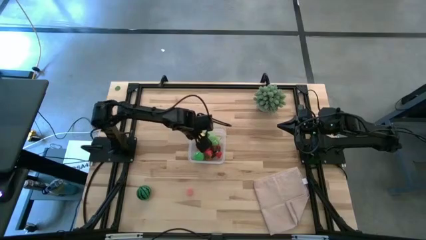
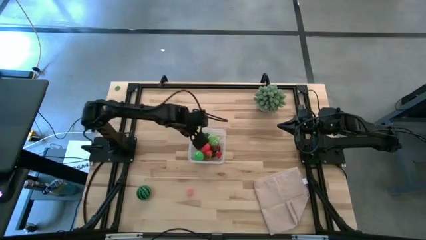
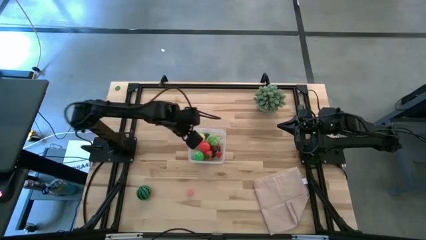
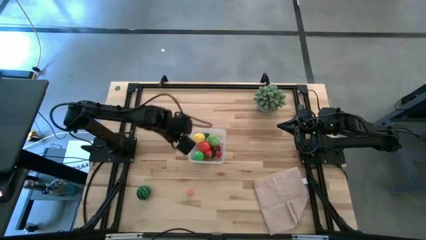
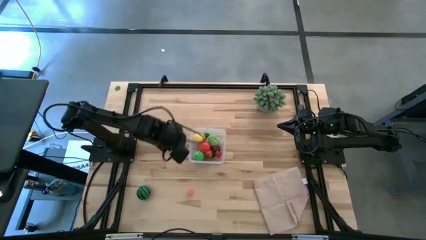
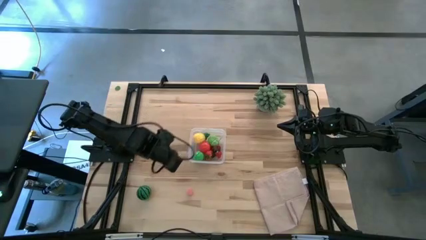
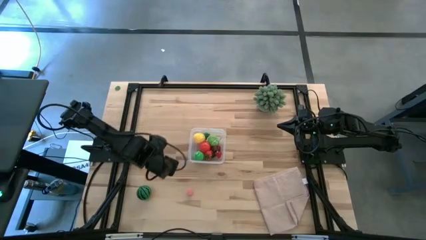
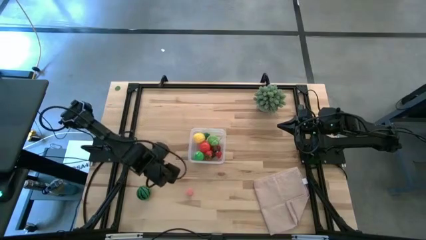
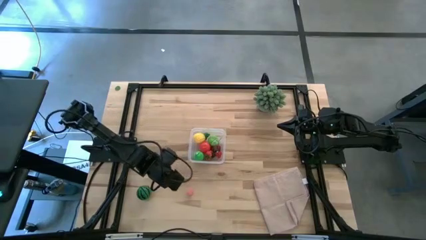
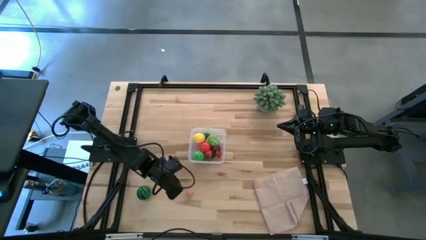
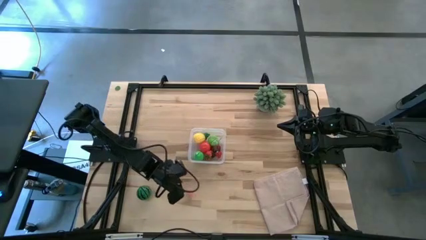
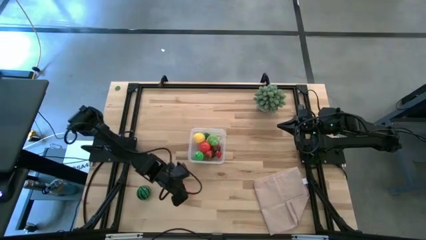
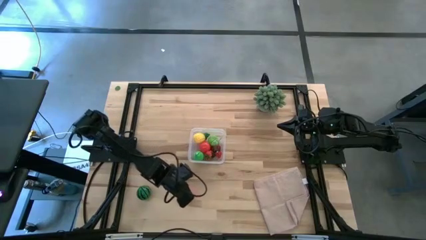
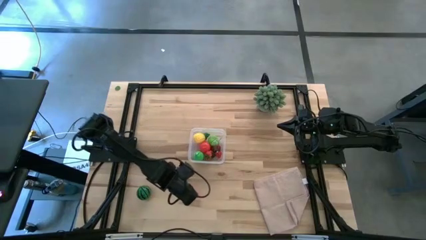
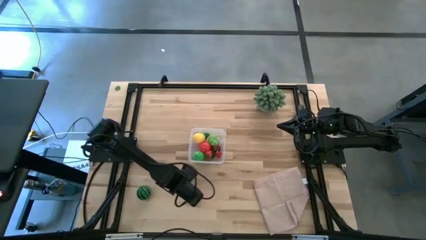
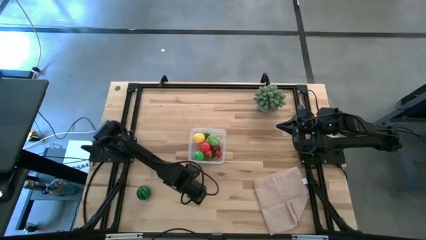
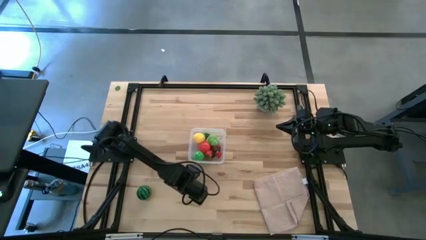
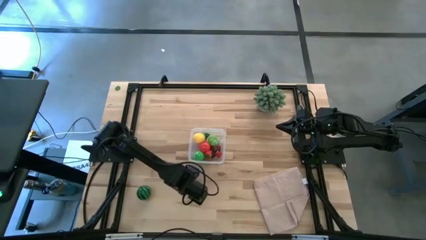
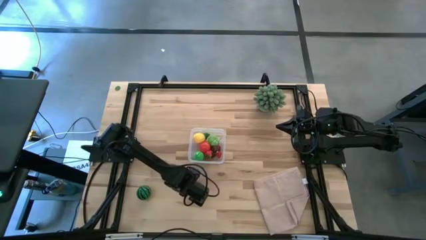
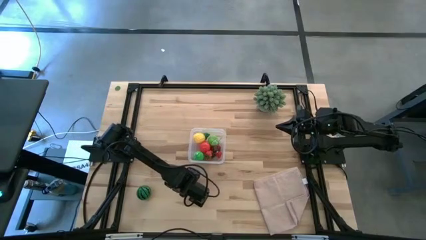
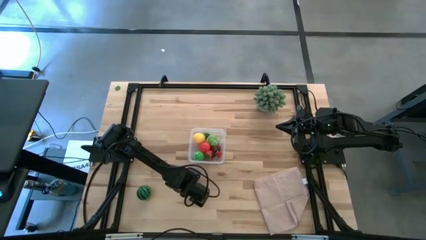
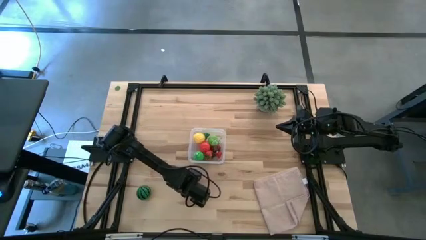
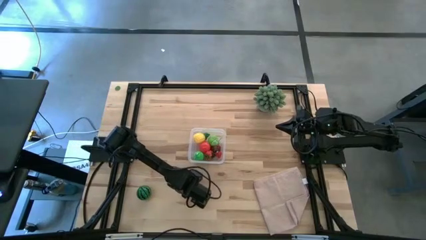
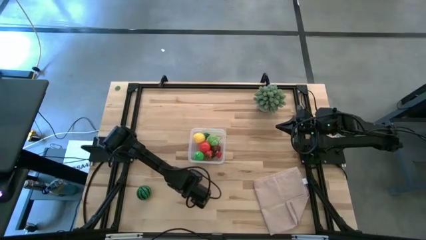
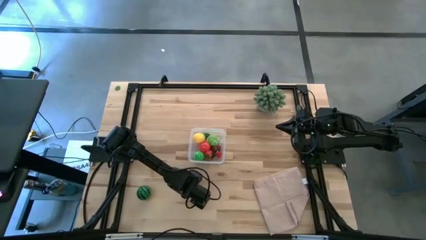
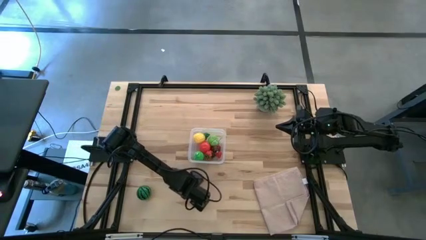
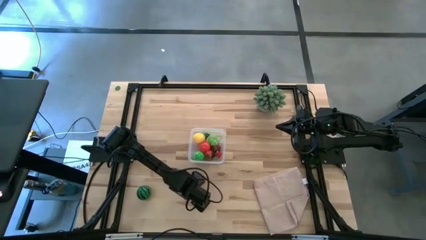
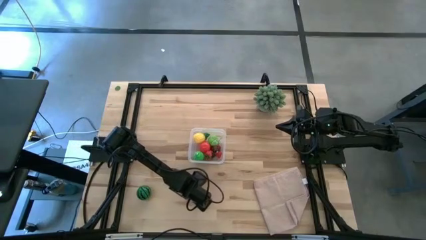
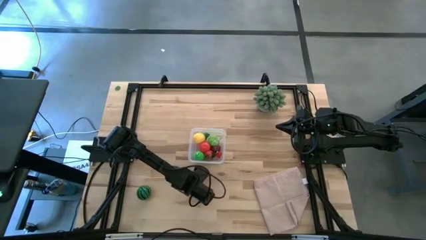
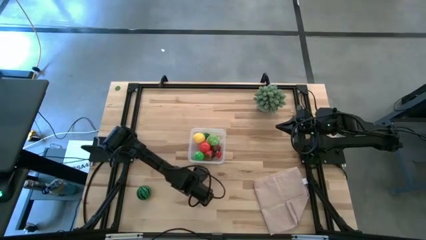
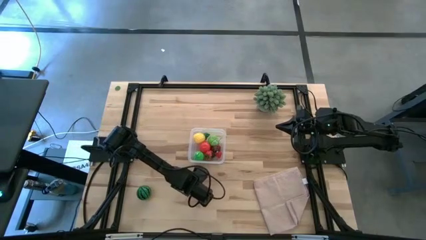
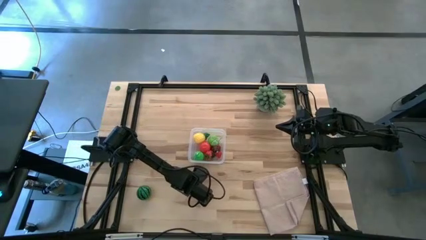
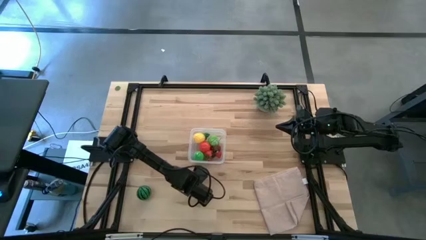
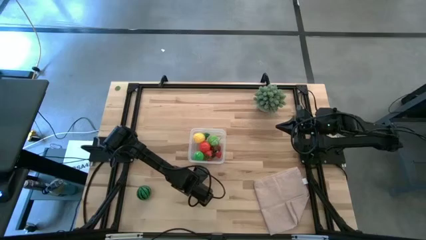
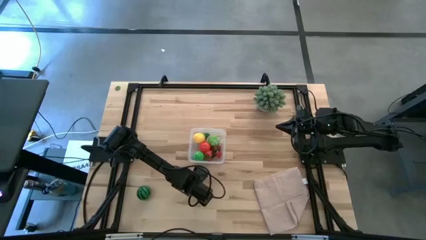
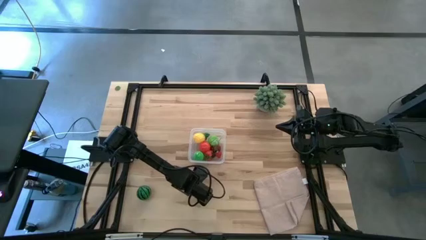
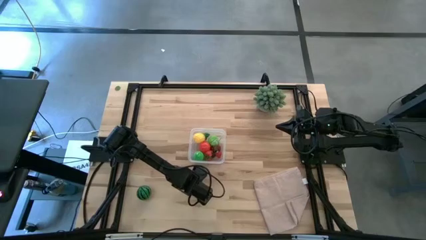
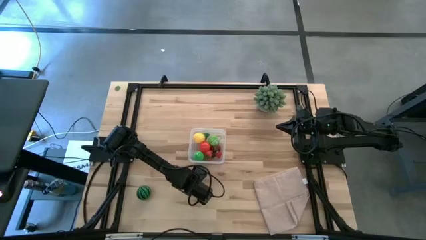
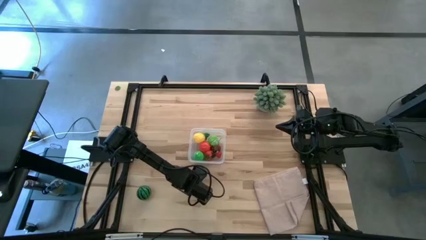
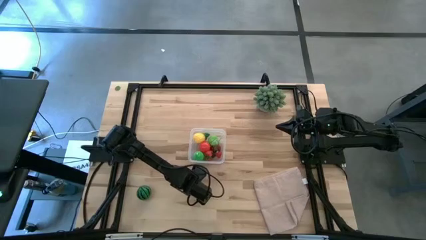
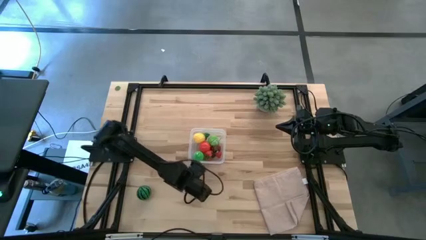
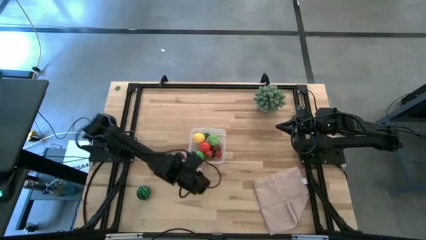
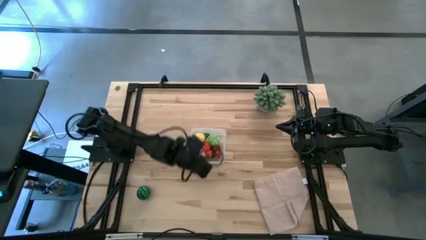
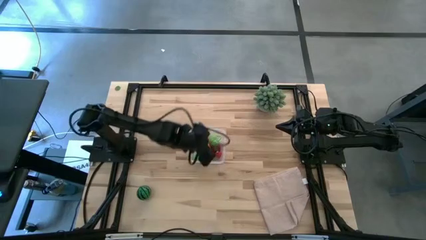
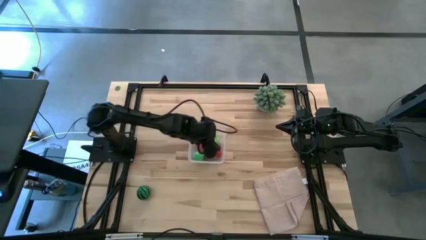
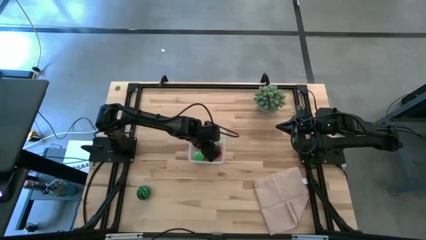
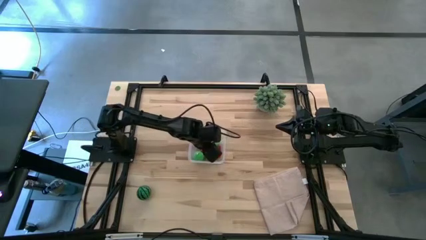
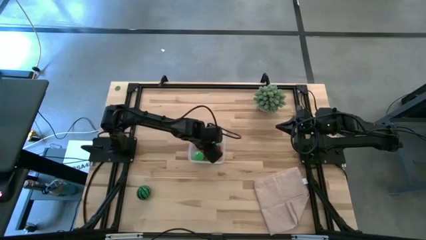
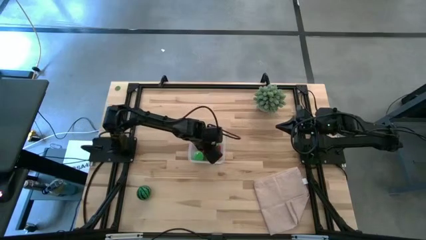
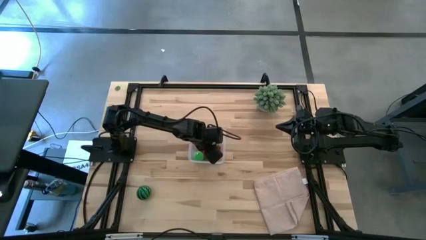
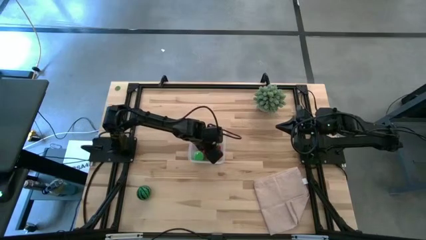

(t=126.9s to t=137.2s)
Task: Pick and placing Produce into tupperware
Put the pink peach into the transparent bin

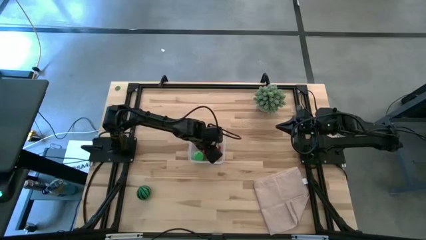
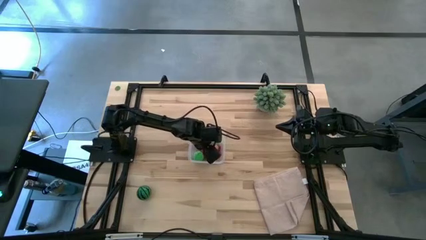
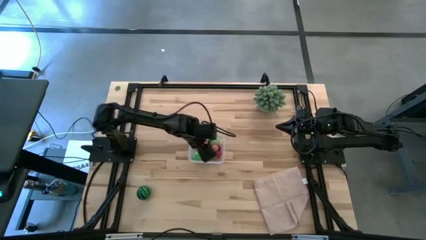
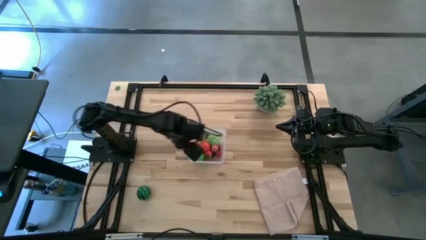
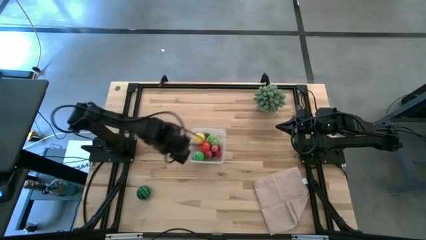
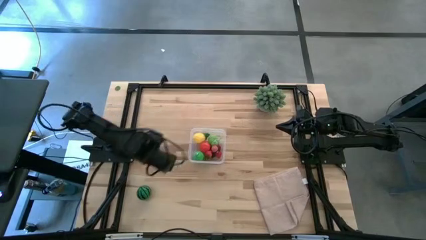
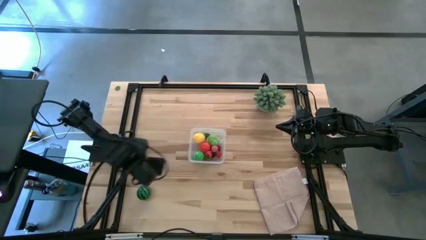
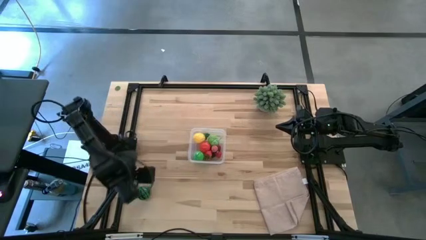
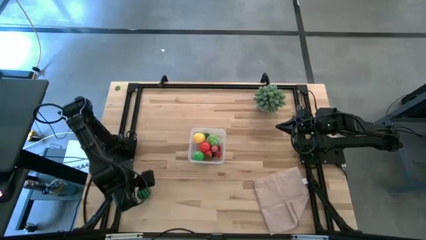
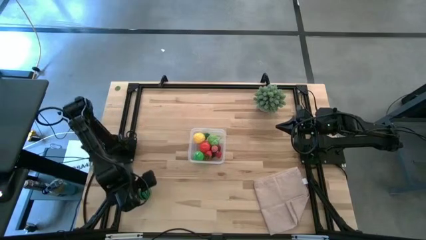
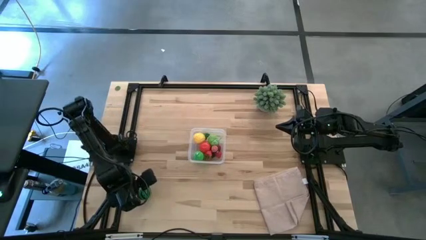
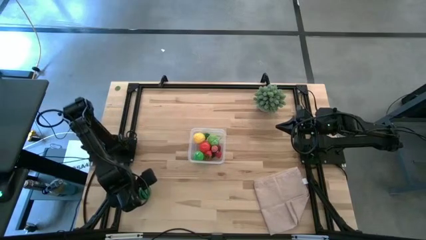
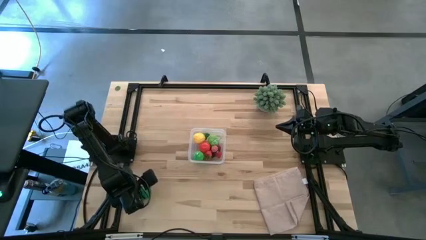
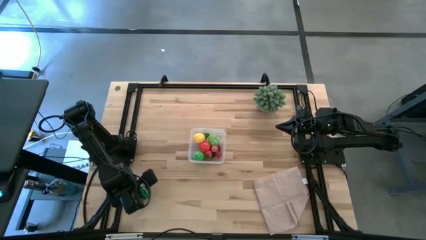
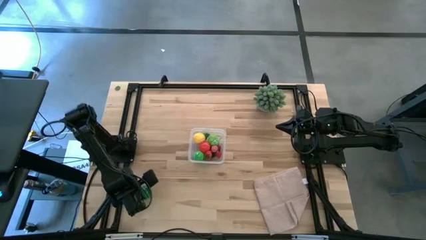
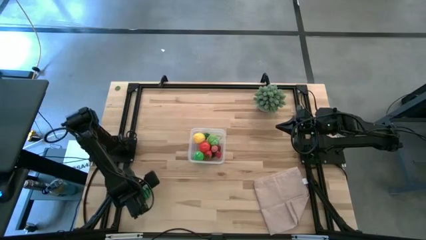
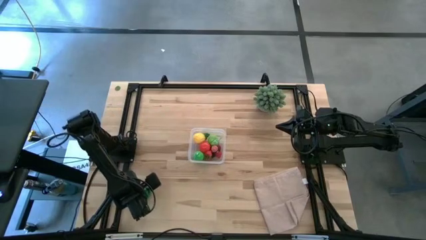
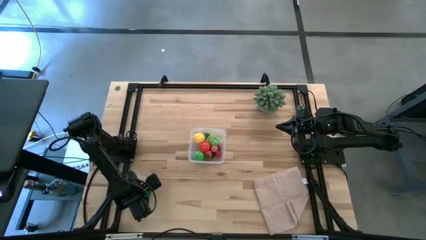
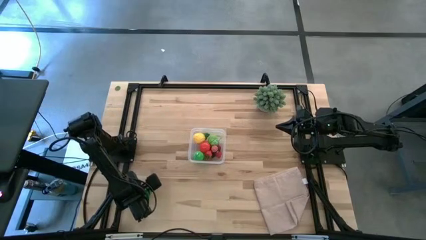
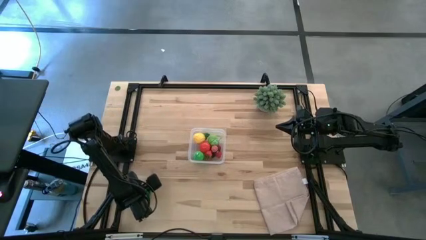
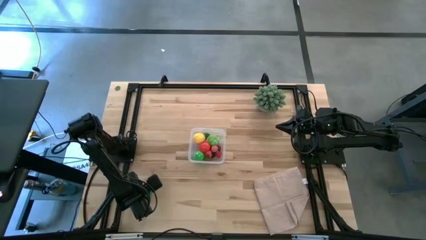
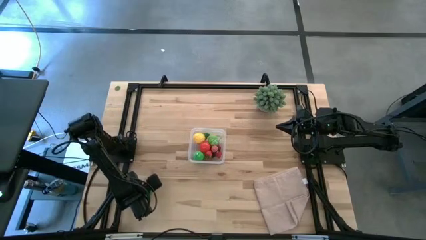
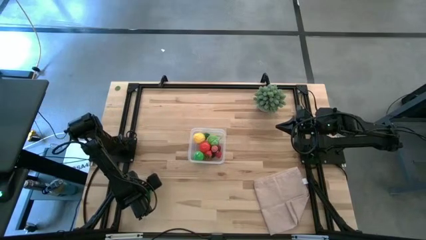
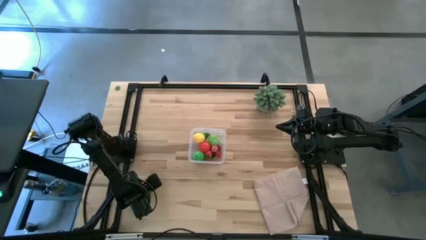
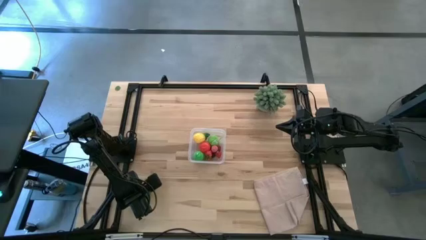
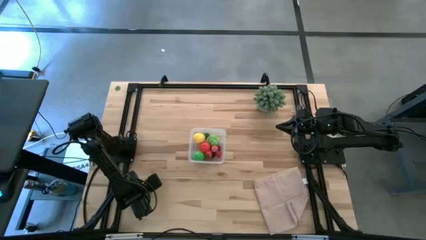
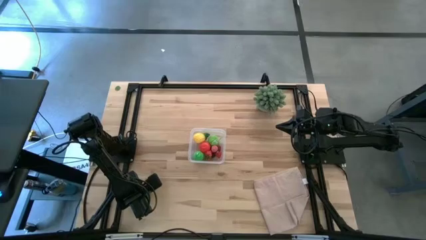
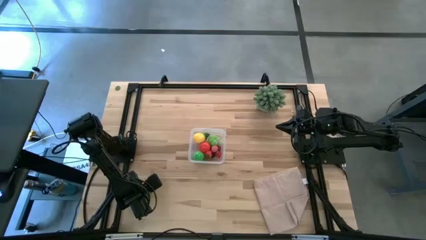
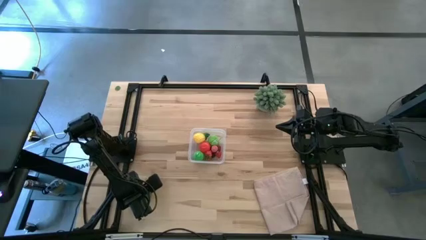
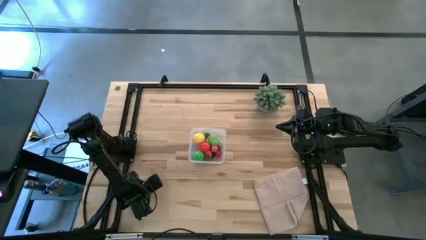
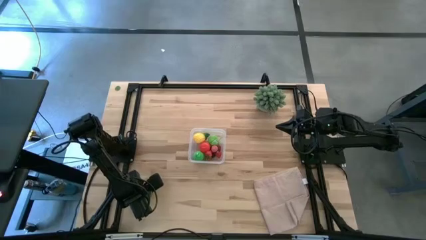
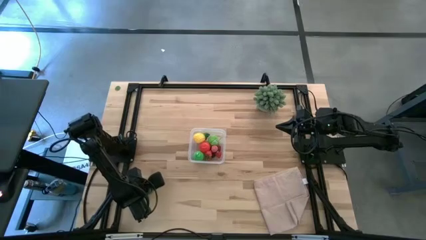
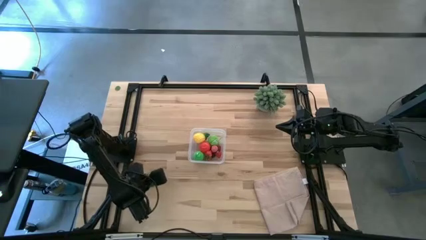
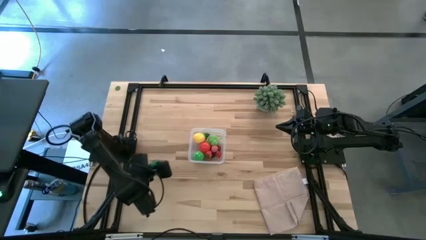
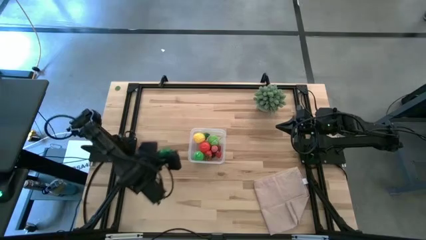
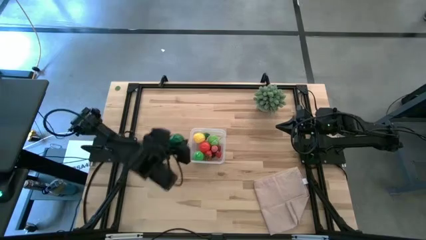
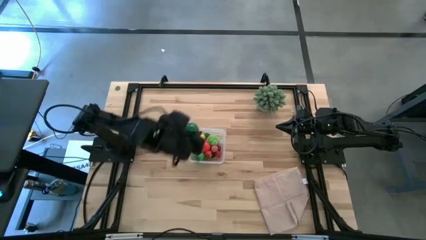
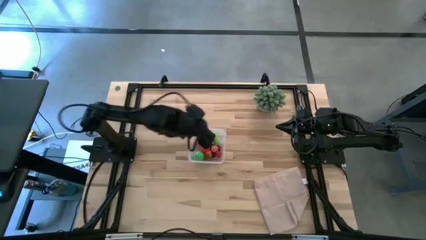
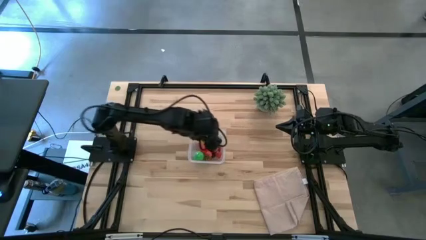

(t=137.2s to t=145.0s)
Put the green watermelon into the transparent bin
